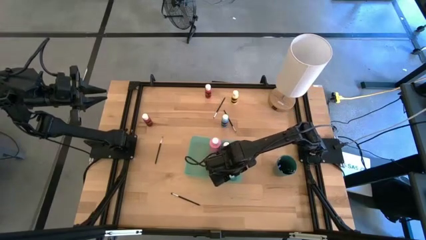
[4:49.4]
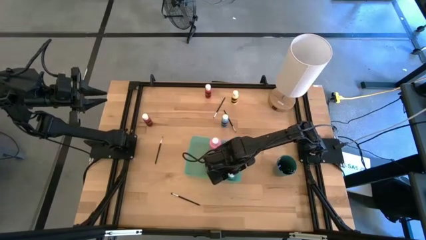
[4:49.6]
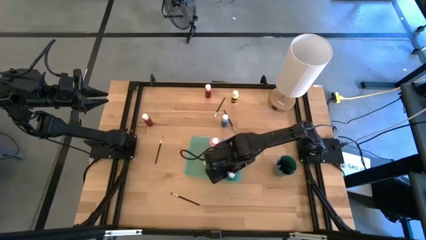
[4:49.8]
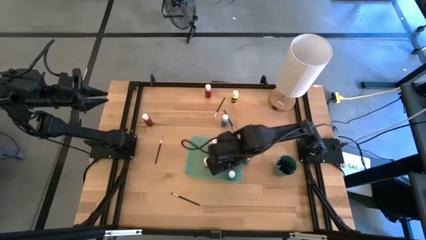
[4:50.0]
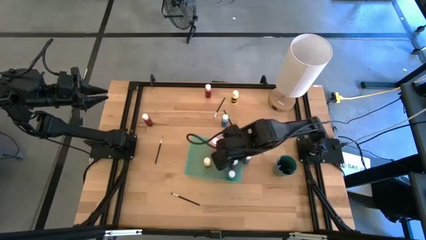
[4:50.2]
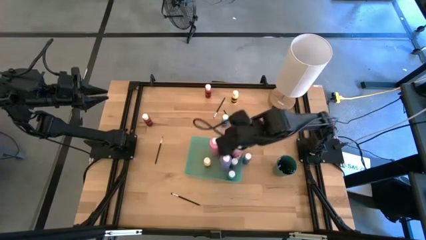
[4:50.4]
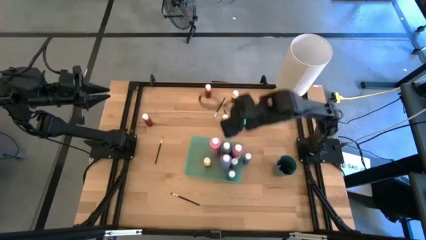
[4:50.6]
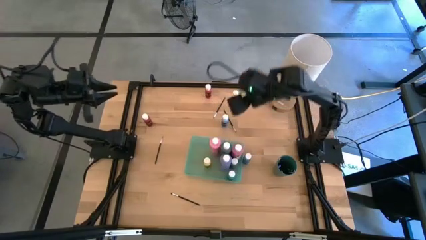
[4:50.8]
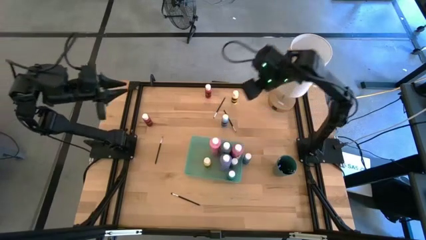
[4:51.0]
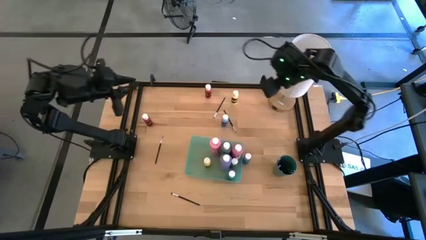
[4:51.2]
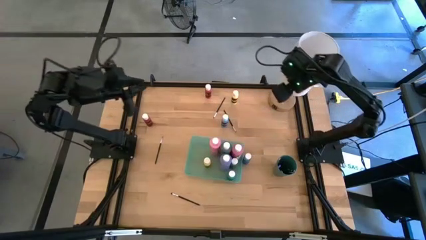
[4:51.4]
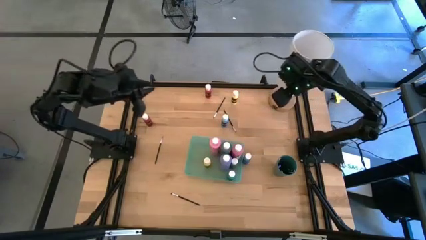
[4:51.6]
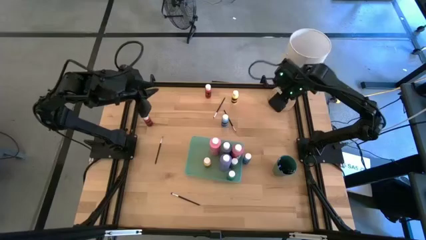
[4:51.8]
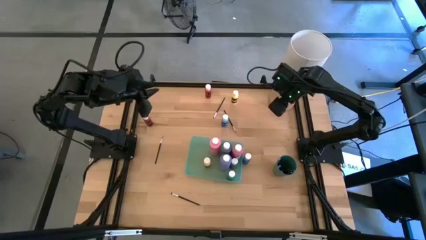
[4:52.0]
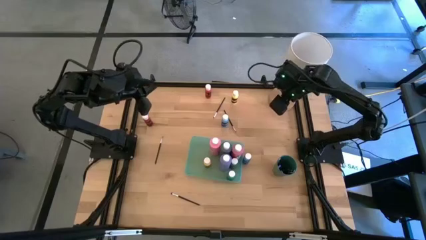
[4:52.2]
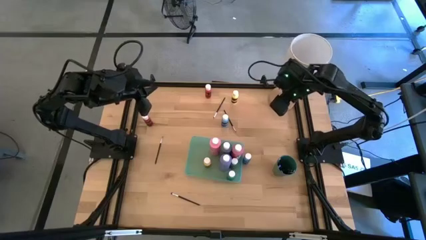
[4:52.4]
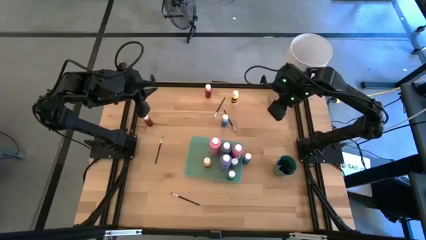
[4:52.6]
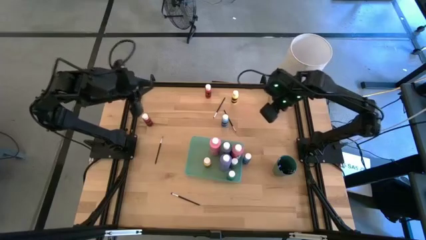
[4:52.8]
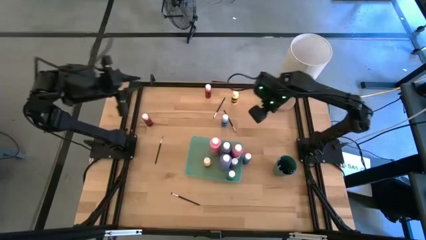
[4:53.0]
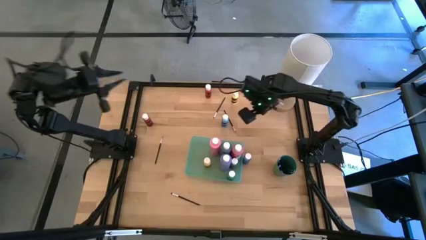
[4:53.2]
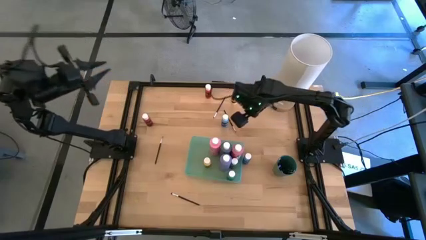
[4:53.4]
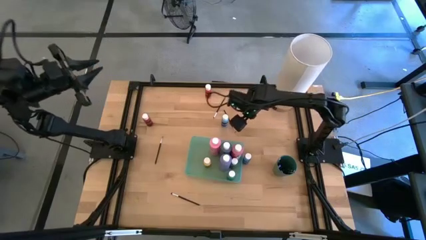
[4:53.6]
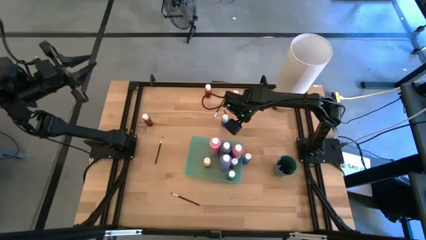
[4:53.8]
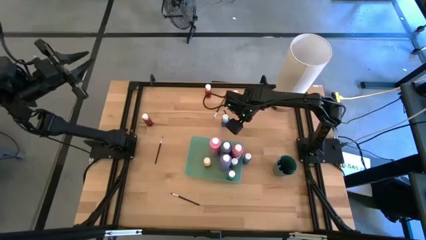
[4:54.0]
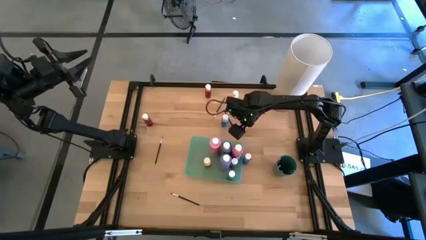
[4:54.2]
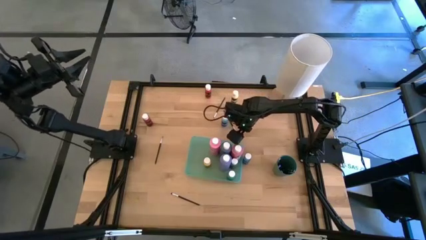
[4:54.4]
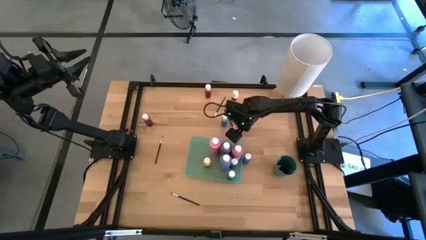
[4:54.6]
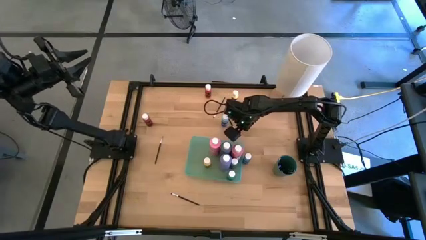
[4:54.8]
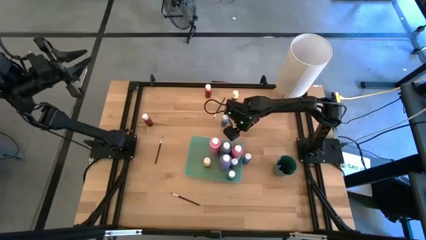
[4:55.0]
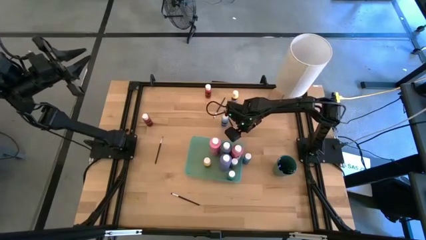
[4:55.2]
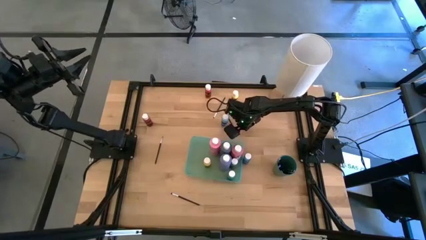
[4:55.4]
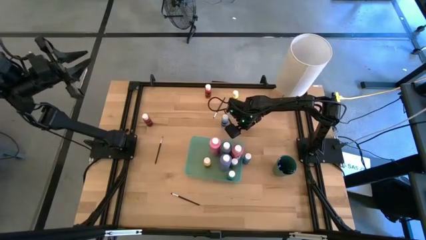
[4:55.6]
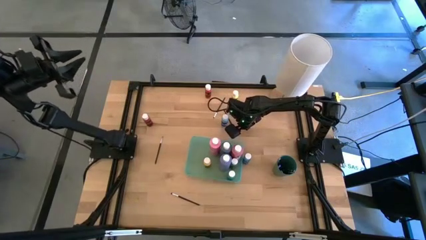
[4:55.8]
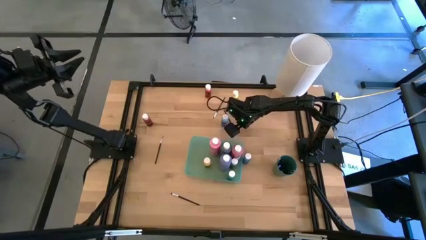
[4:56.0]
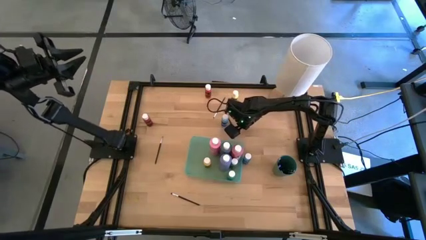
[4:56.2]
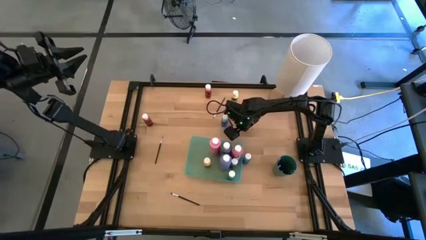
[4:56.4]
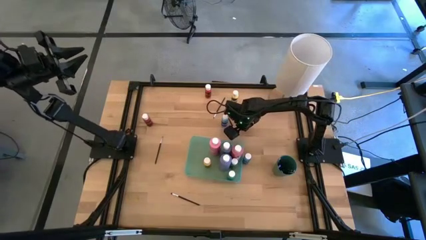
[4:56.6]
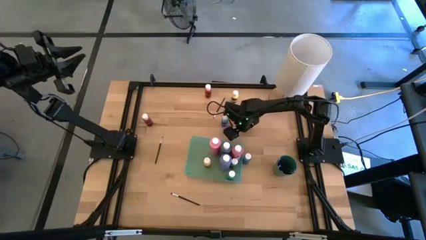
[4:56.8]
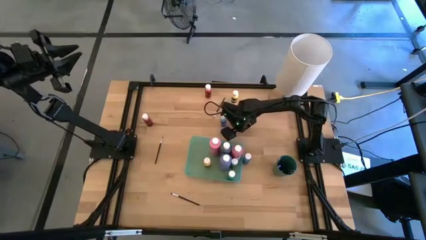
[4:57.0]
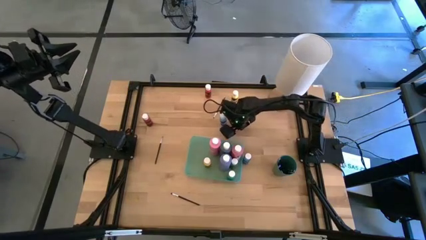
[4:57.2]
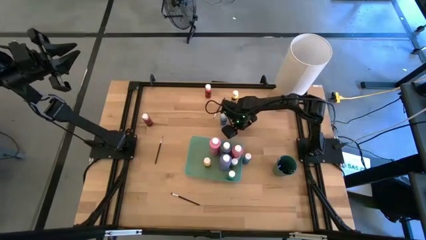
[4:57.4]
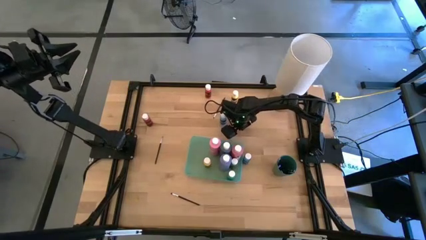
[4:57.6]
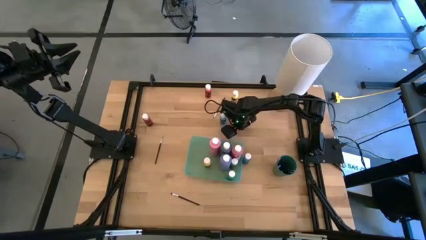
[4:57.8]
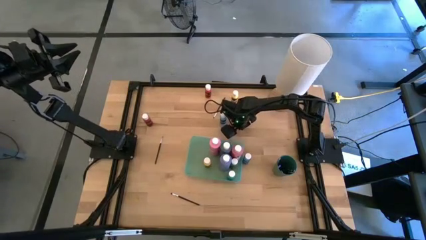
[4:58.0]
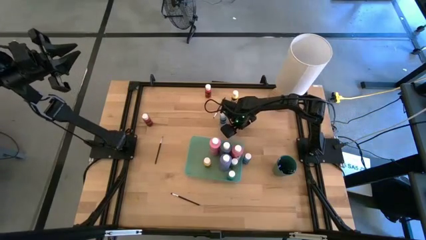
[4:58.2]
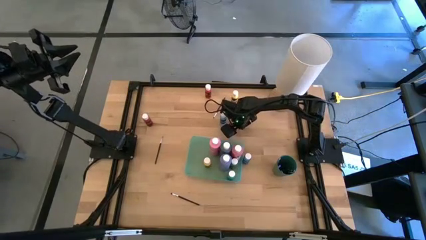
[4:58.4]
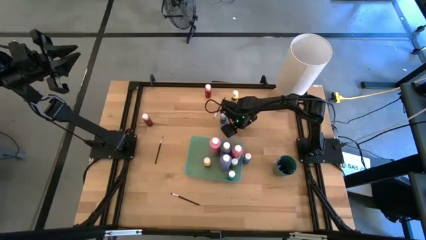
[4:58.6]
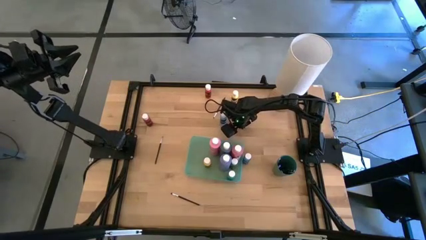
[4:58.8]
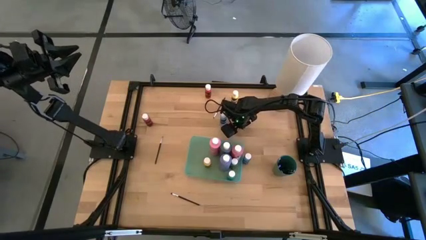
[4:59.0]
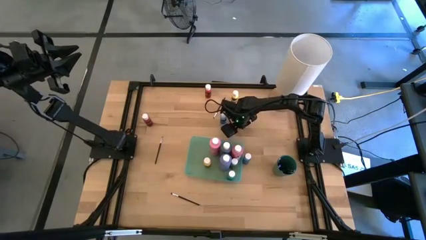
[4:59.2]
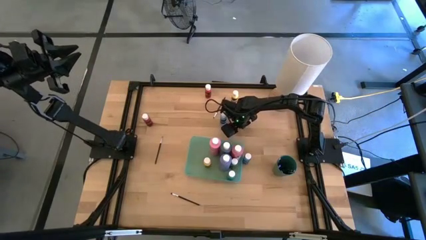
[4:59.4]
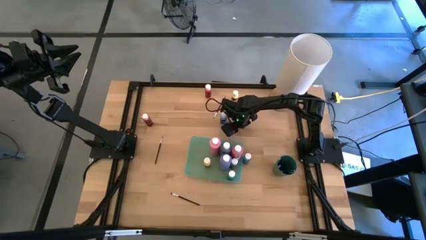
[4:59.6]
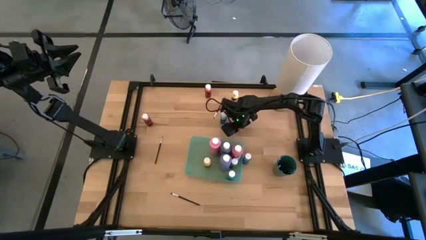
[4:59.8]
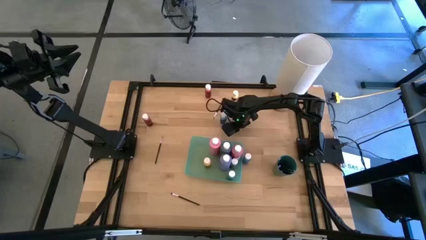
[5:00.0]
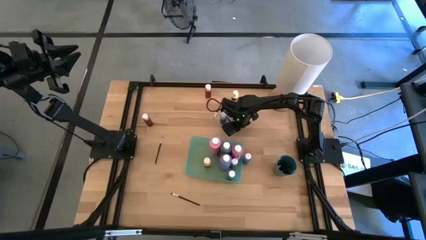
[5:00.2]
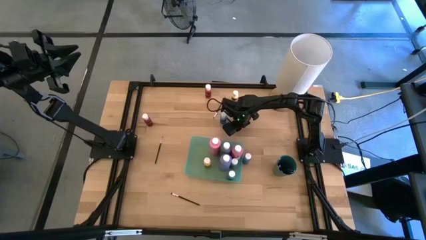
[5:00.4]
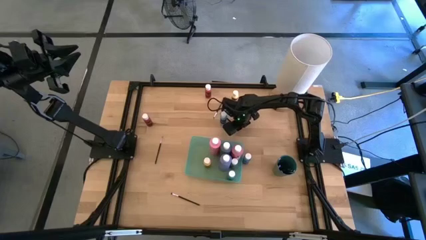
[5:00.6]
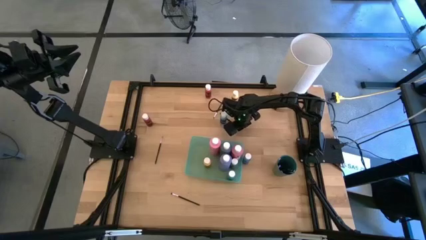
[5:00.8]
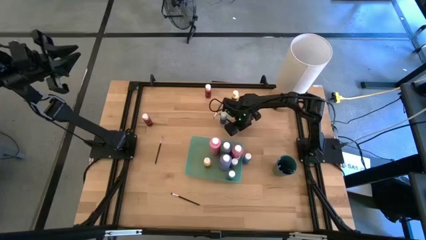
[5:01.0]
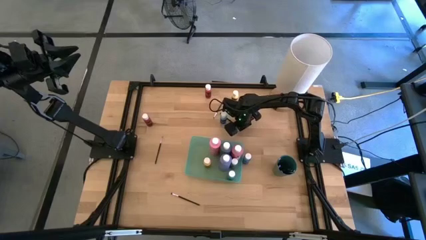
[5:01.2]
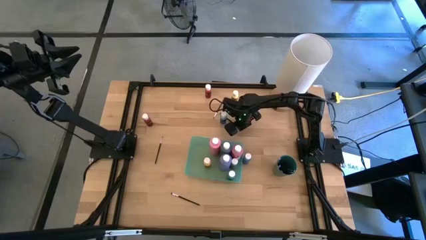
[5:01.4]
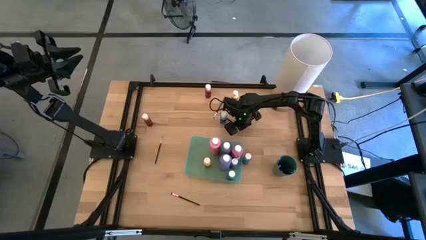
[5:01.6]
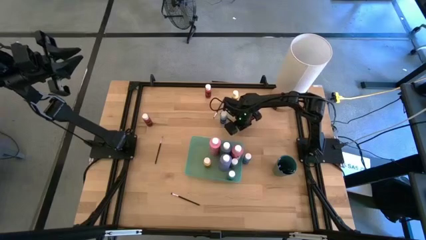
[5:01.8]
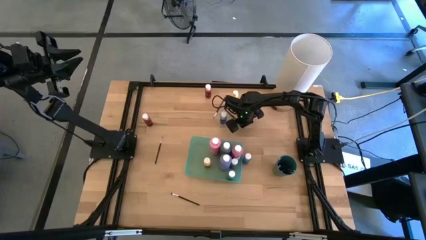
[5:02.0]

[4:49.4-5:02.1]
Task: Pick & Place Paint Supplies
Put the black eyeshadow brush into the green cup
